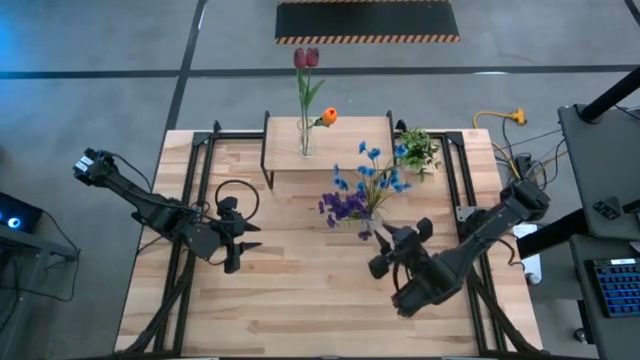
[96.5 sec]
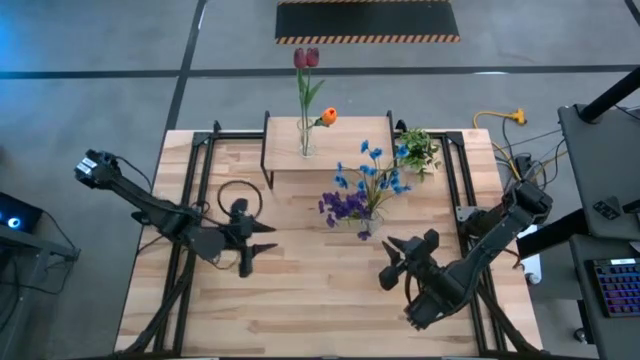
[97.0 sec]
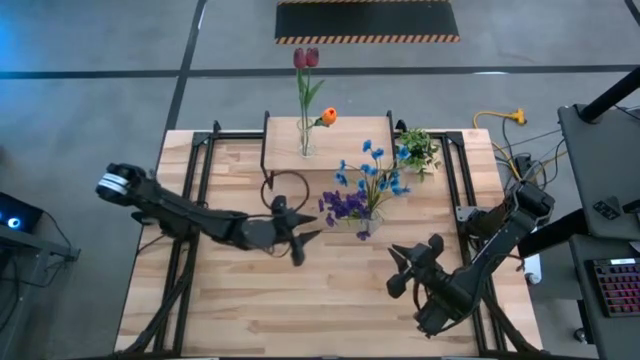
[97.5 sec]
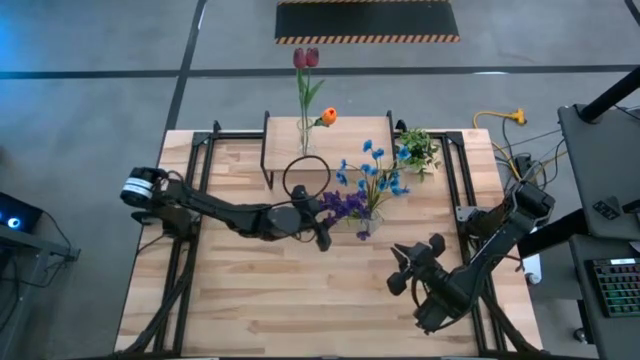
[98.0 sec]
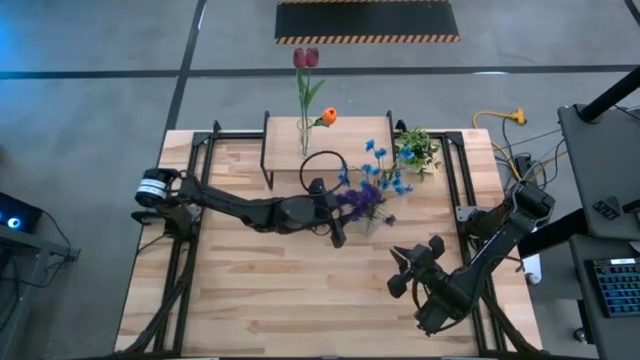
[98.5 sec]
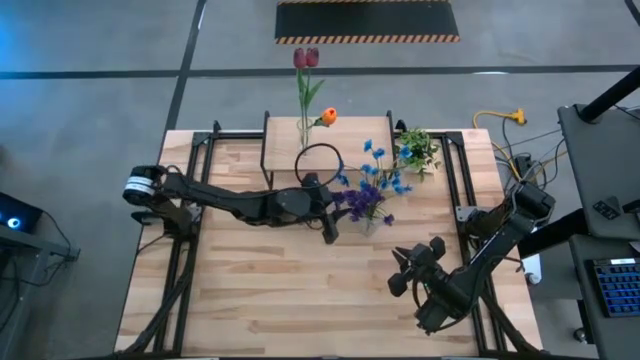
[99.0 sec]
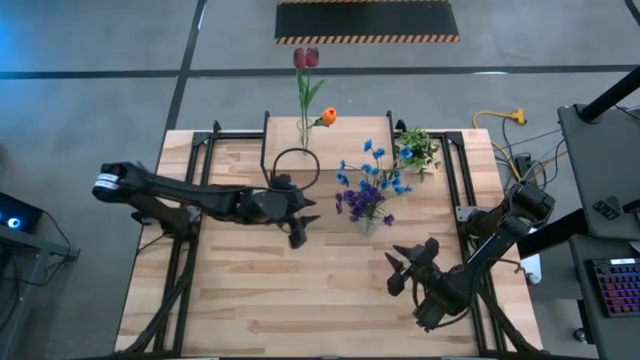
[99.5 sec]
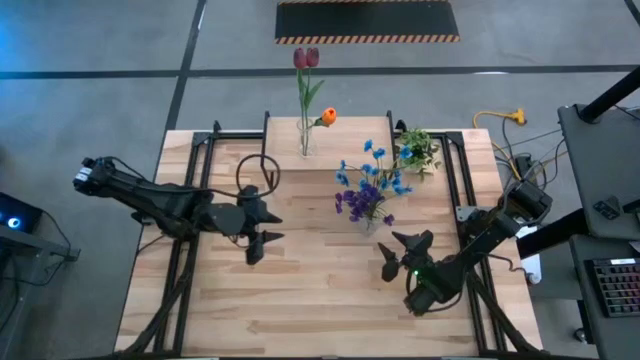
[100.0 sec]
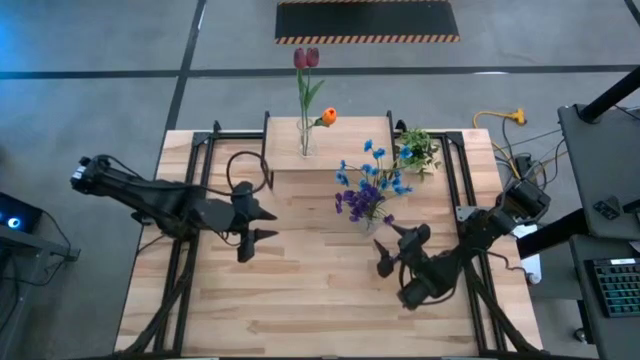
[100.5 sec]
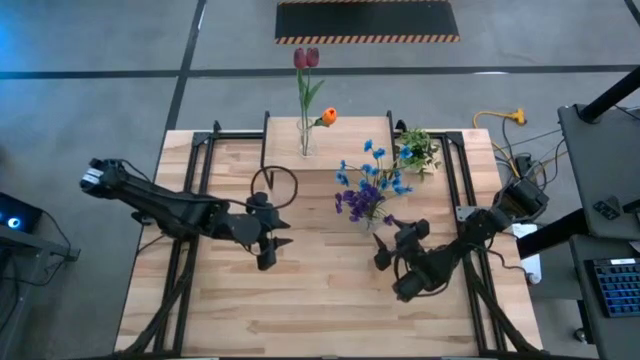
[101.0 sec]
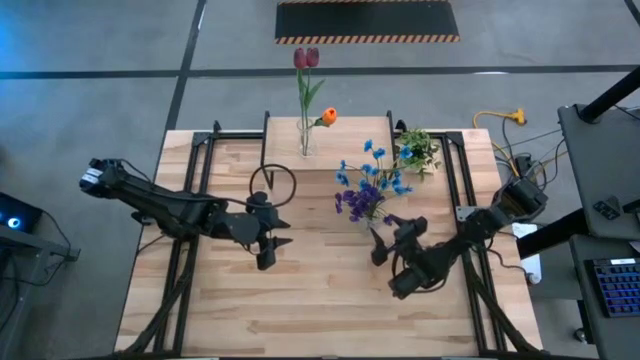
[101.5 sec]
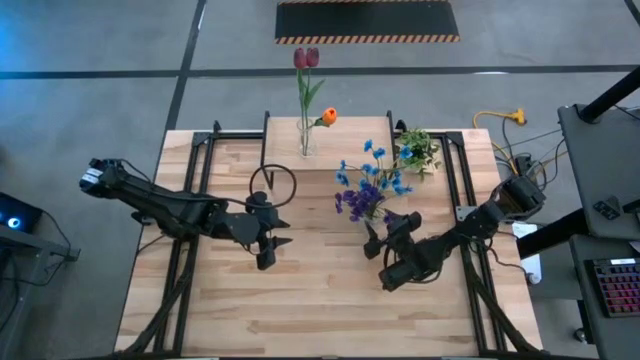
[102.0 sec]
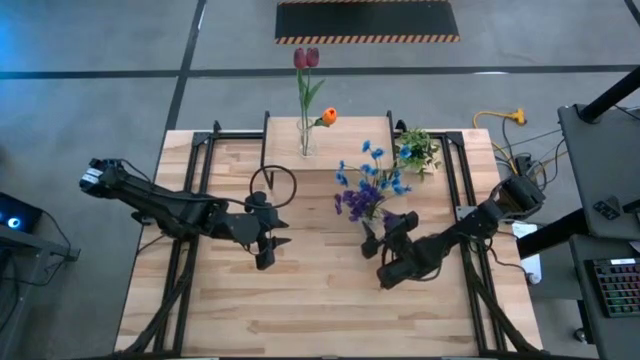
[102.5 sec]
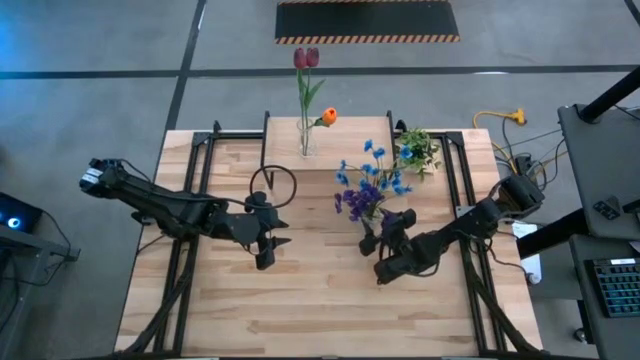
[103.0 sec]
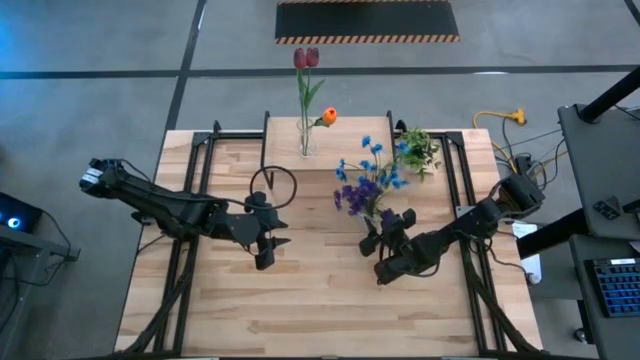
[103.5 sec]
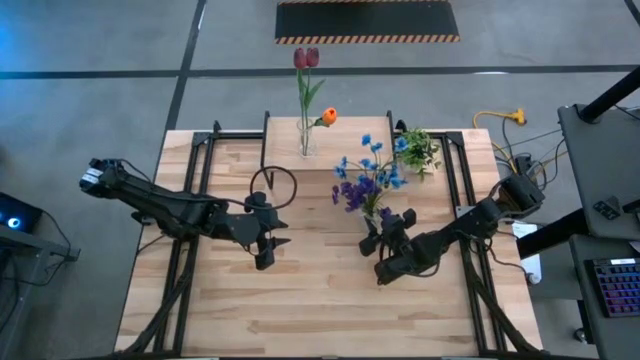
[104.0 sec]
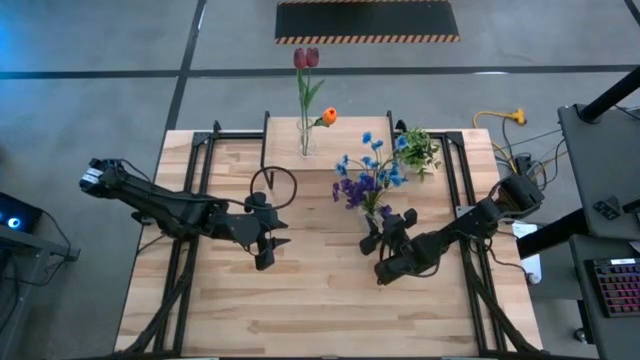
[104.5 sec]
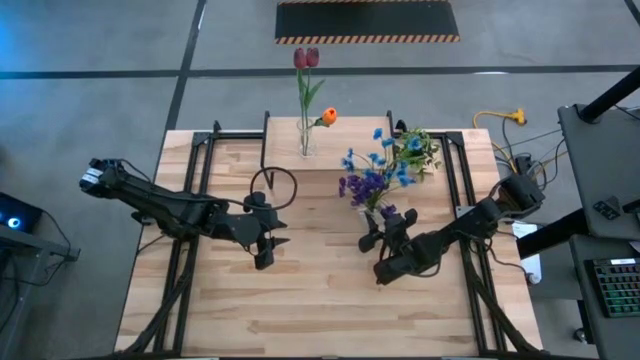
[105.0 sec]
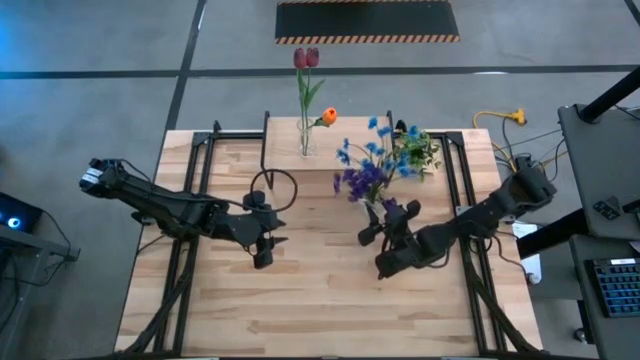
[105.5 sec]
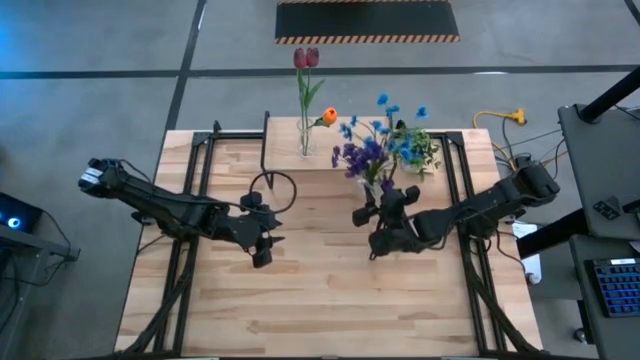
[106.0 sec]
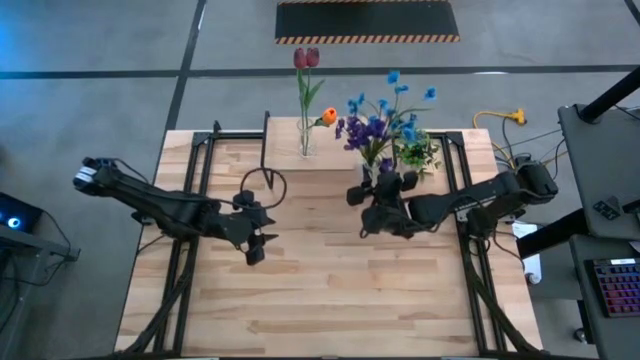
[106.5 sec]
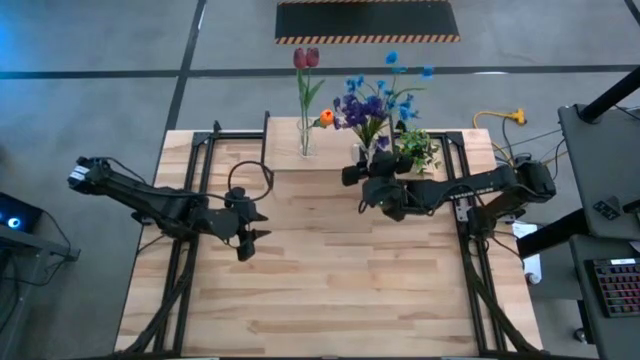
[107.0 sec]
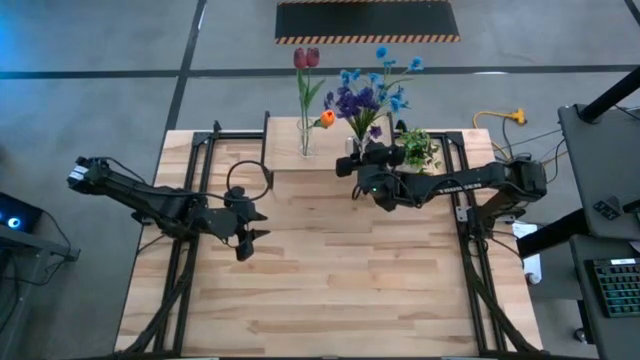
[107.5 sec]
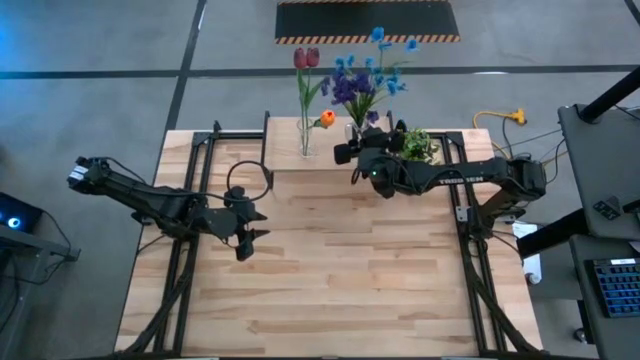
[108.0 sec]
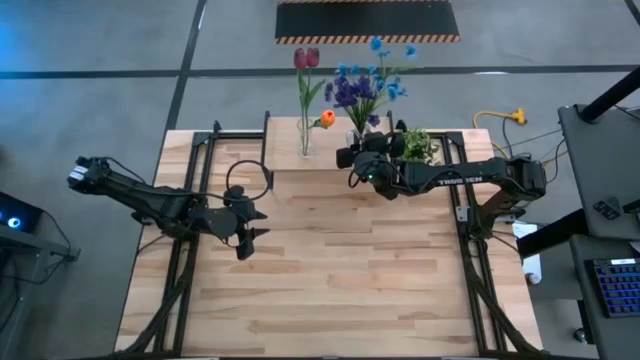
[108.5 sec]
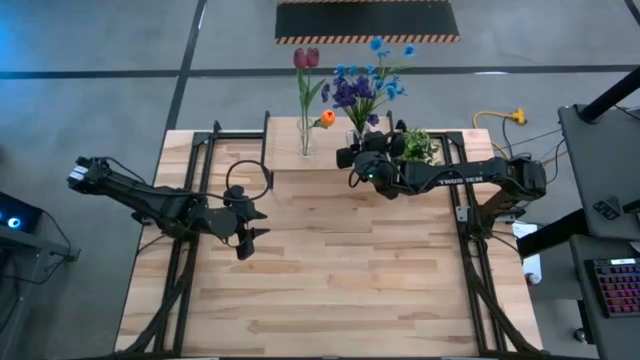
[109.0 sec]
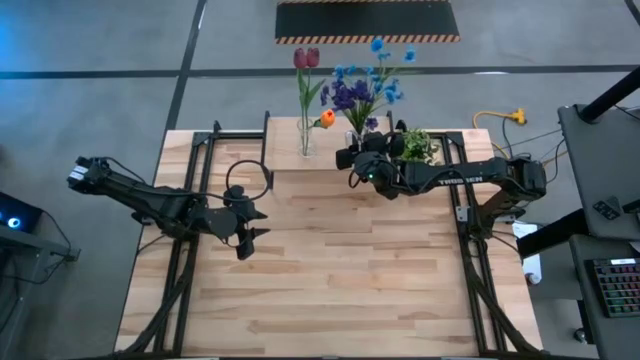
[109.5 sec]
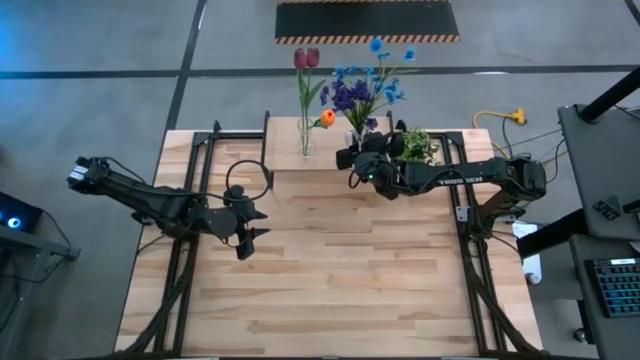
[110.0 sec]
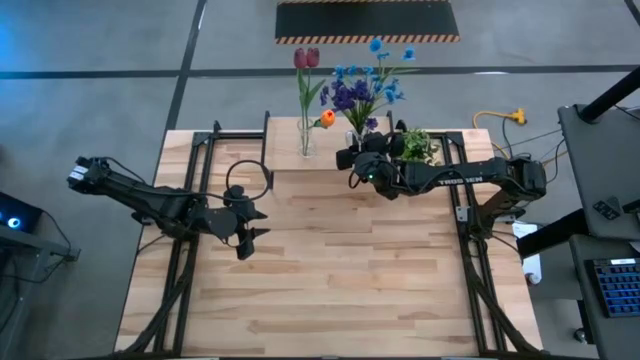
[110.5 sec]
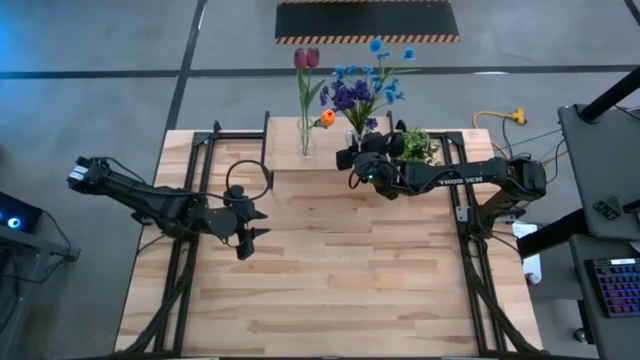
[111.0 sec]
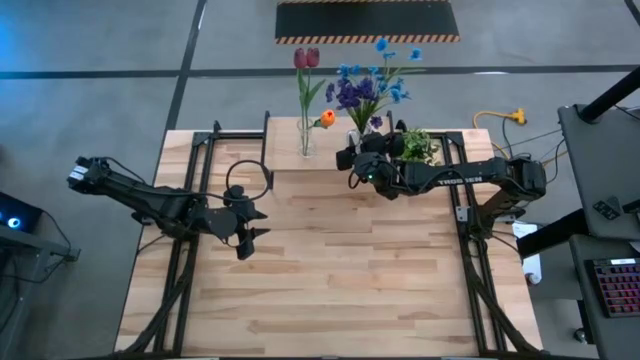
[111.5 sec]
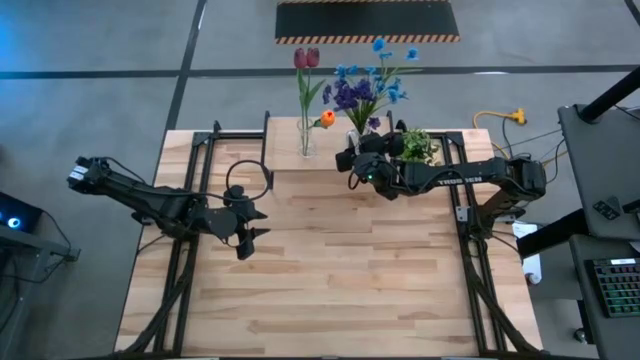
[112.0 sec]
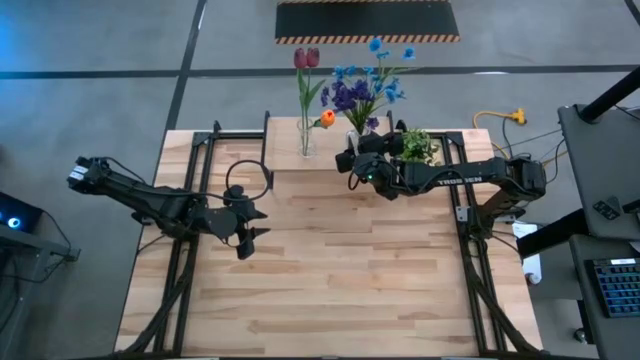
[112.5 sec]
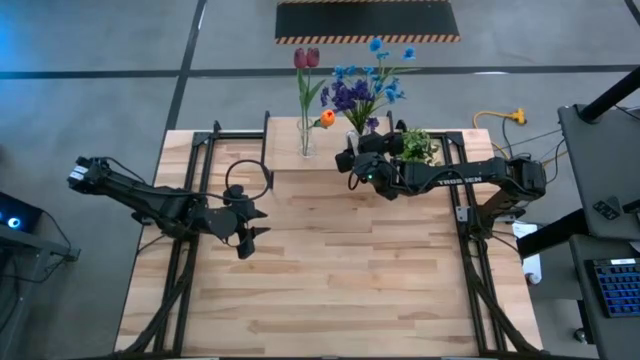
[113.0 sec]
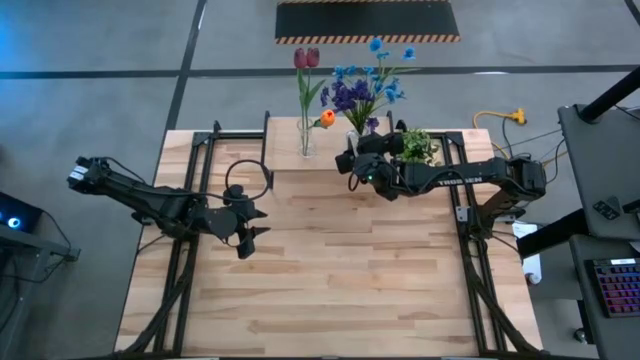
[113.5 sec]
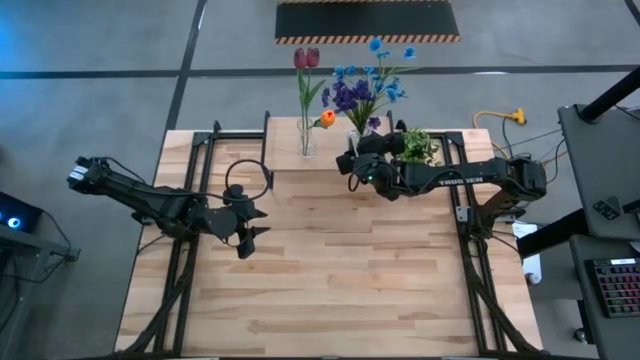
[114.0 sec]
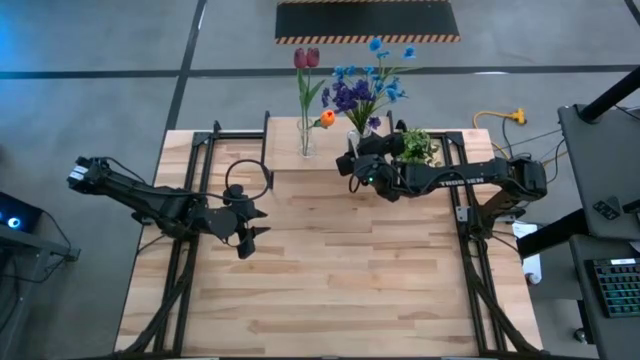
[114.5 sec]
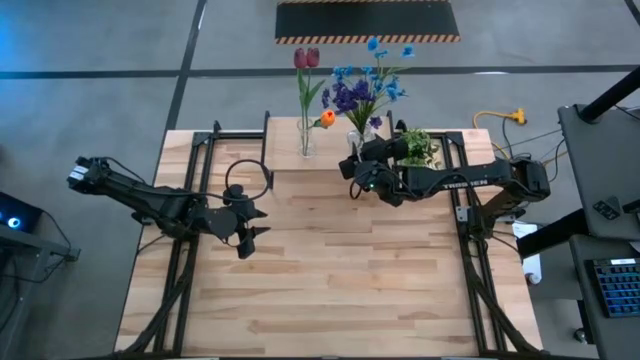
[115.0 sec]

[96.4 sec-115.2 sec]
Task: Pick and place flowers into a vace then onto a shelf
Put the transparent vase with the flowers on the shelf

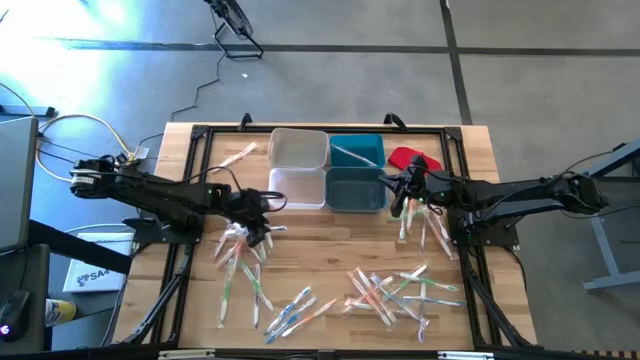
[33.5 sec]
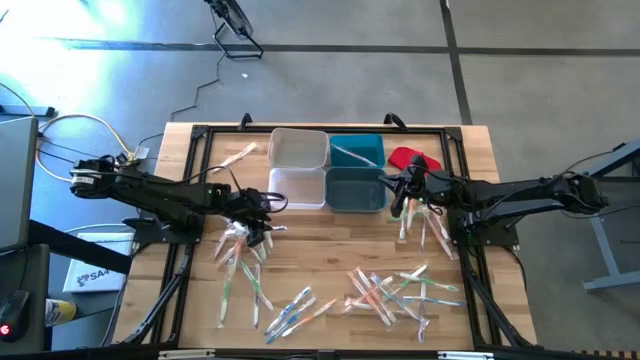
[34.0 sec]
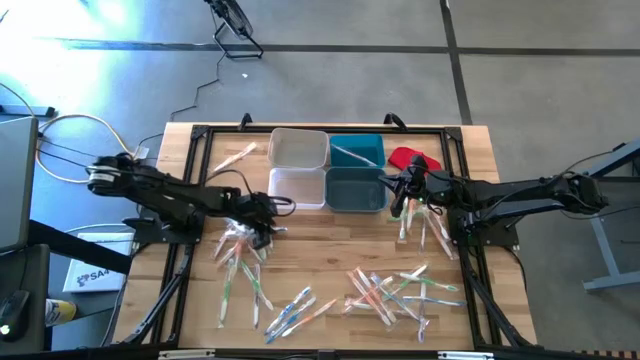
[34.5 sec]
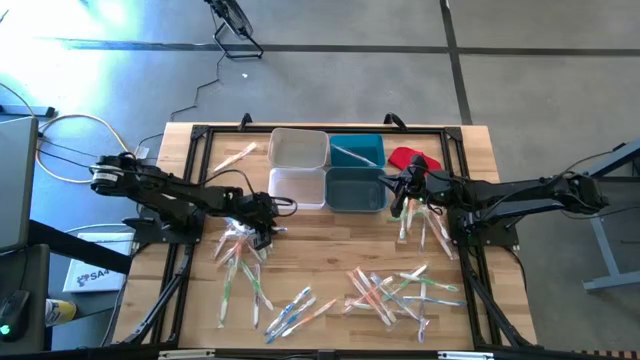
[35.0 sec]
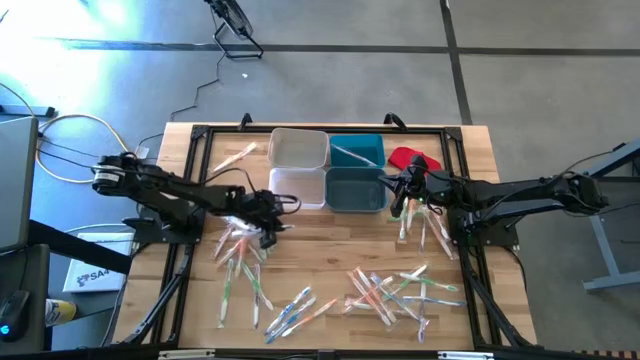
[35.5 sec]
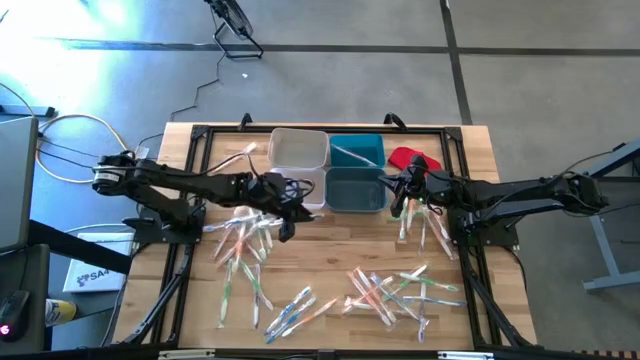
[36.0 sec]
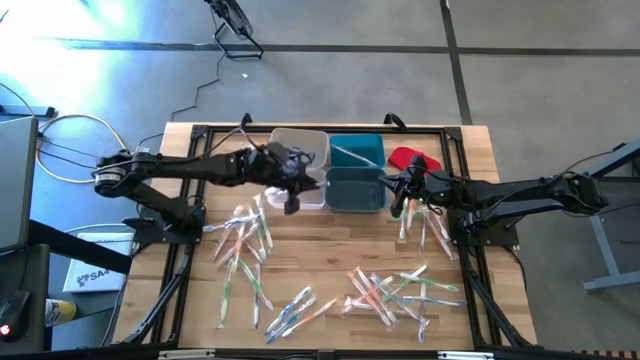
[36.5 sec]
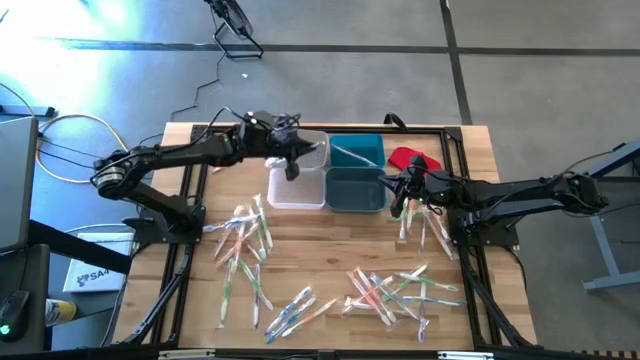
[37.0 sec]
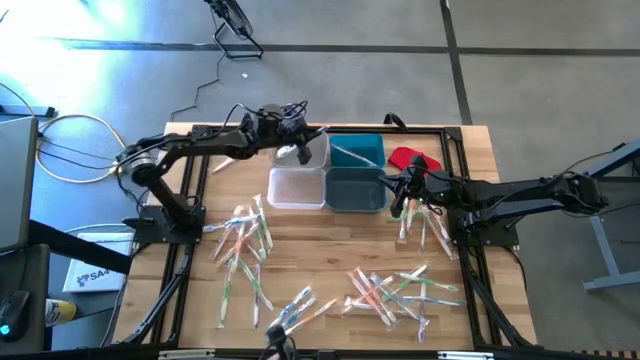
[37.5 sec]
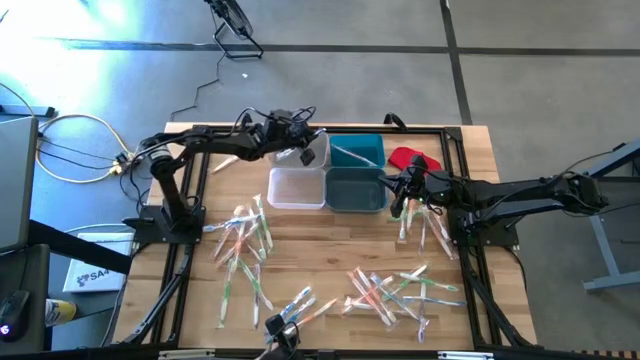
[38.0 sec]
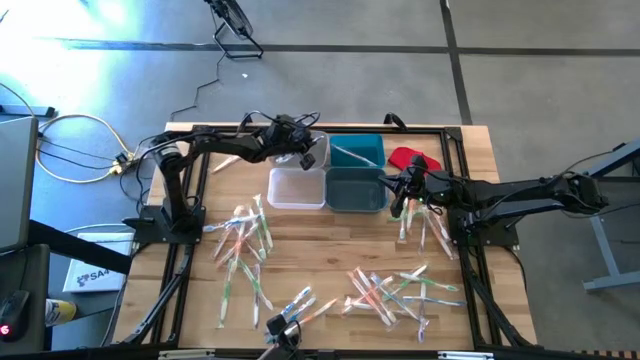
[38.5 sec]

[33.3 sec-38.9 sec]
Task: Pick & Place Toothbrushes
Put the blue toothbrush into the white bin
